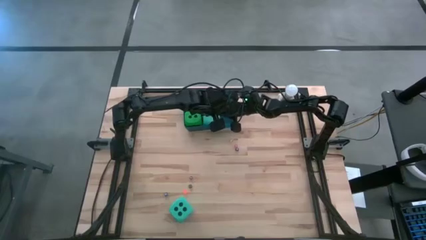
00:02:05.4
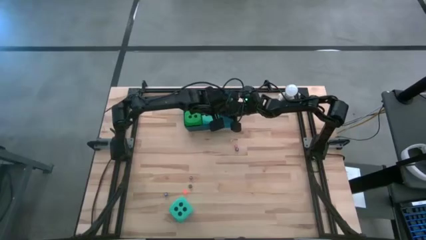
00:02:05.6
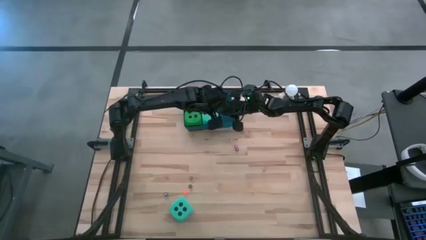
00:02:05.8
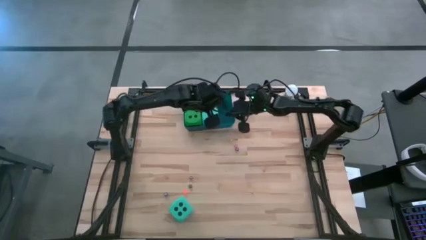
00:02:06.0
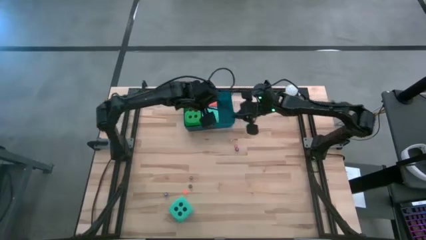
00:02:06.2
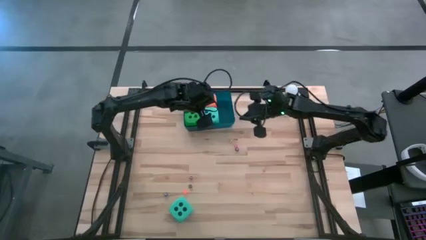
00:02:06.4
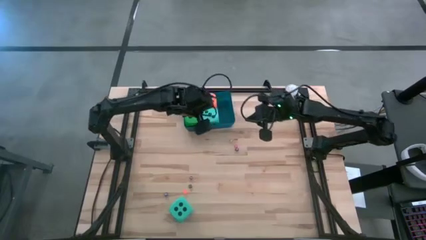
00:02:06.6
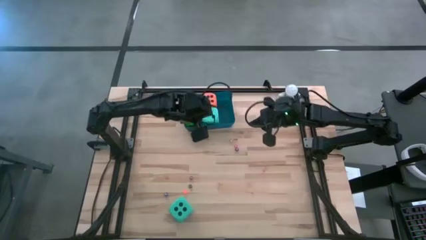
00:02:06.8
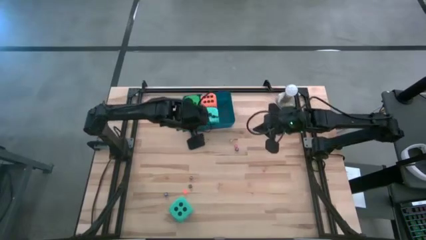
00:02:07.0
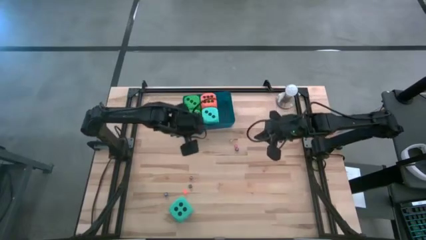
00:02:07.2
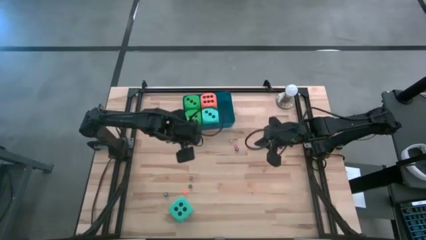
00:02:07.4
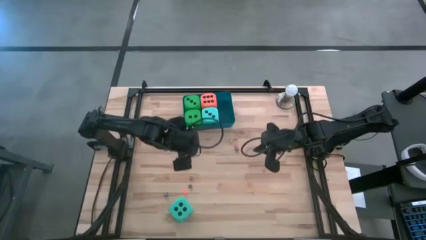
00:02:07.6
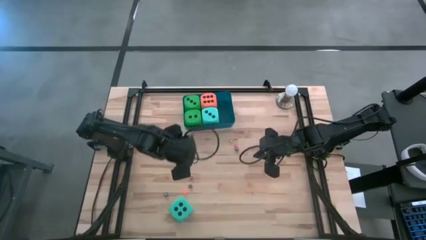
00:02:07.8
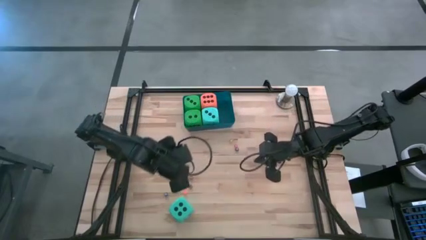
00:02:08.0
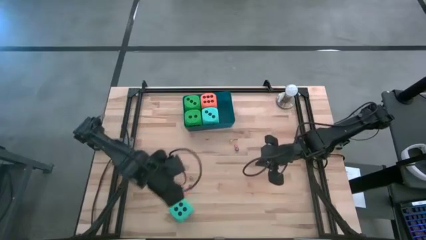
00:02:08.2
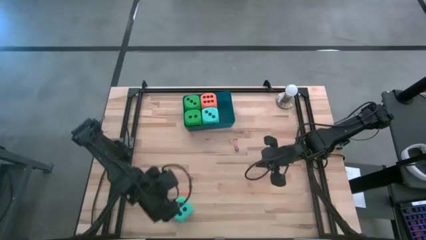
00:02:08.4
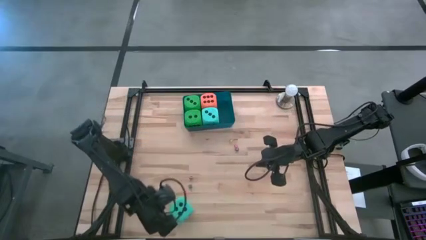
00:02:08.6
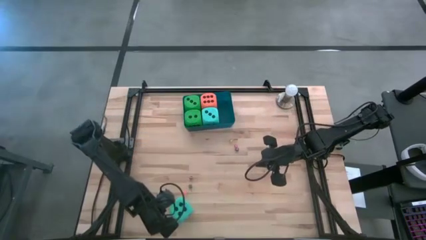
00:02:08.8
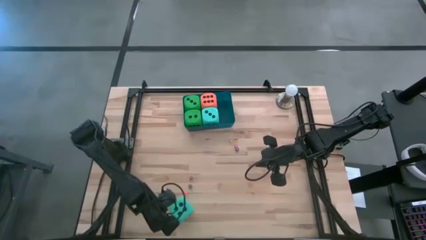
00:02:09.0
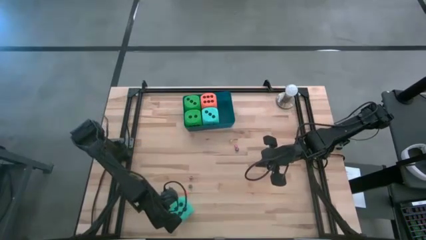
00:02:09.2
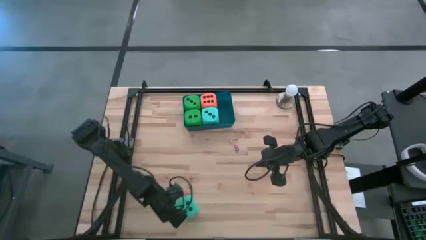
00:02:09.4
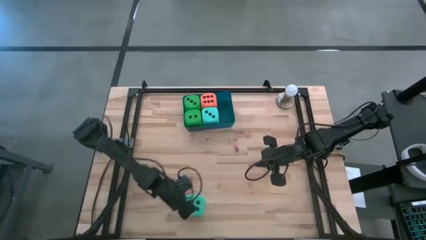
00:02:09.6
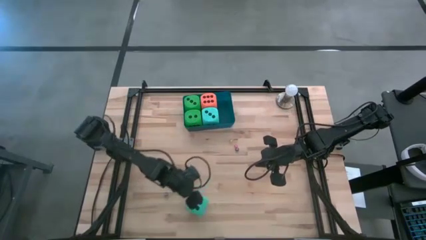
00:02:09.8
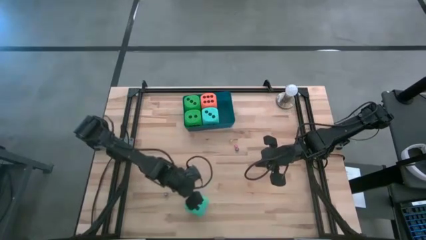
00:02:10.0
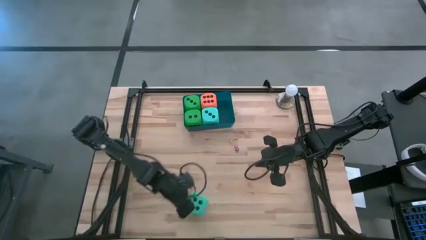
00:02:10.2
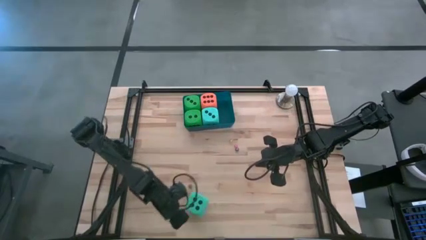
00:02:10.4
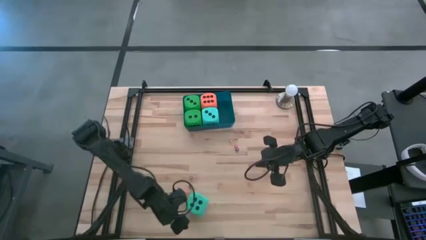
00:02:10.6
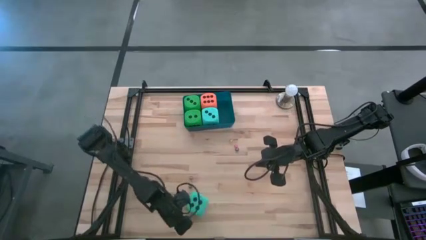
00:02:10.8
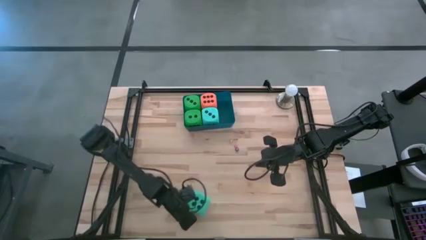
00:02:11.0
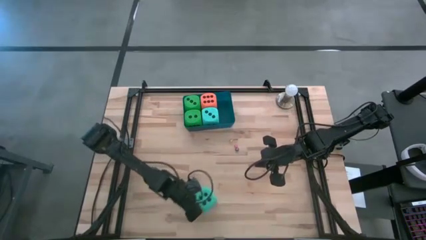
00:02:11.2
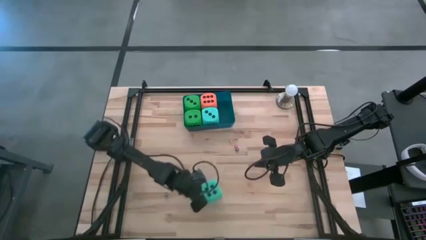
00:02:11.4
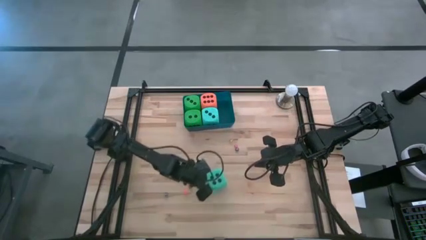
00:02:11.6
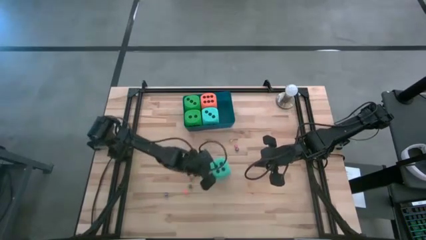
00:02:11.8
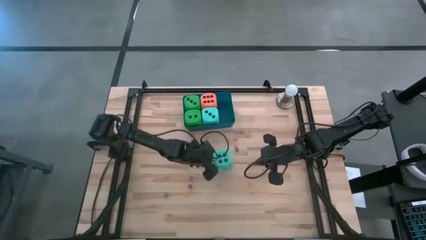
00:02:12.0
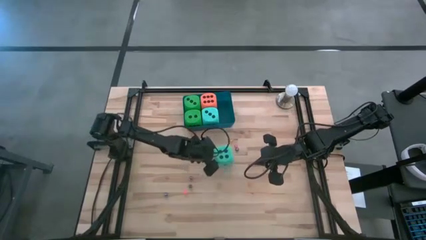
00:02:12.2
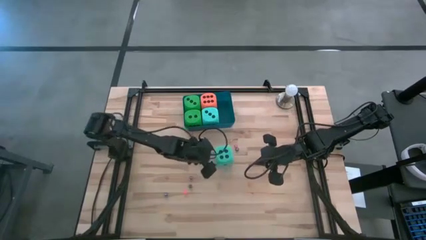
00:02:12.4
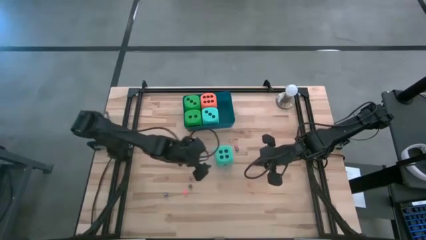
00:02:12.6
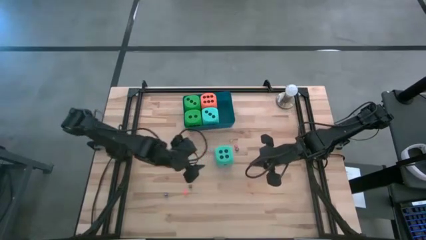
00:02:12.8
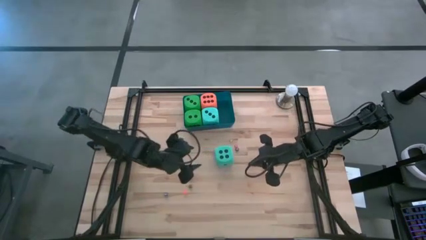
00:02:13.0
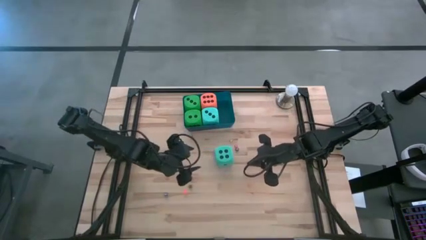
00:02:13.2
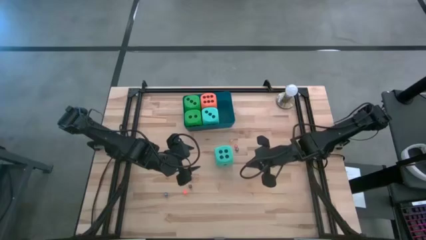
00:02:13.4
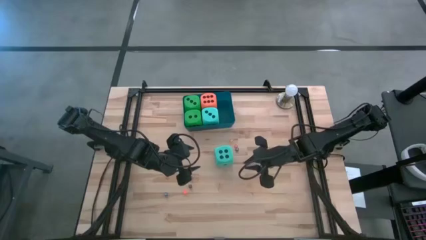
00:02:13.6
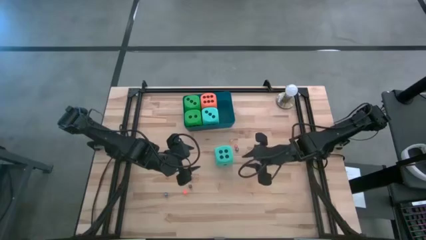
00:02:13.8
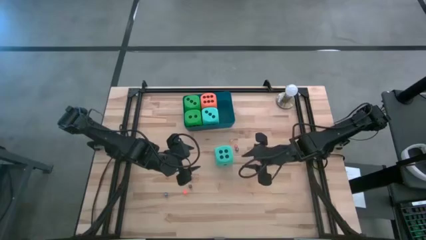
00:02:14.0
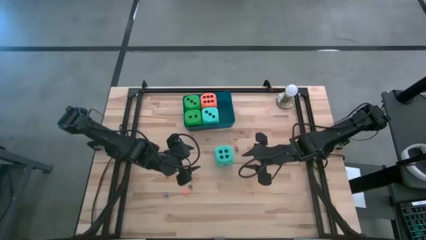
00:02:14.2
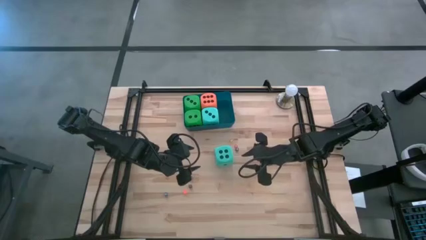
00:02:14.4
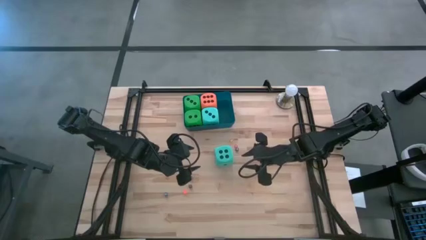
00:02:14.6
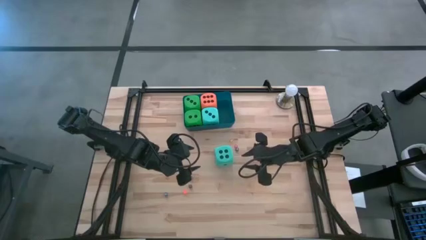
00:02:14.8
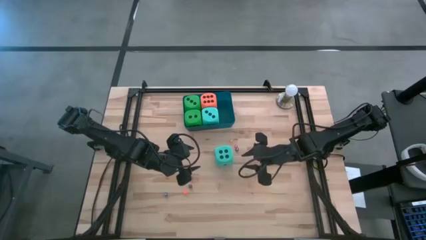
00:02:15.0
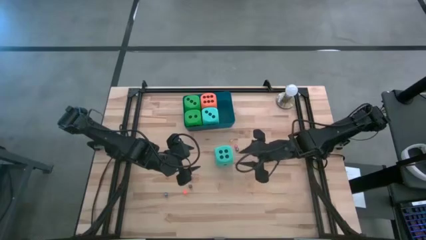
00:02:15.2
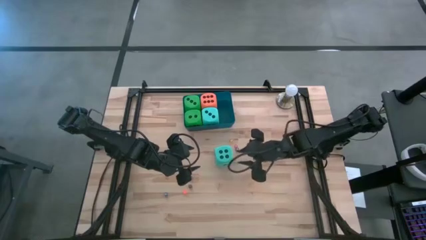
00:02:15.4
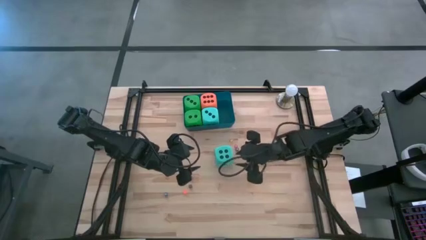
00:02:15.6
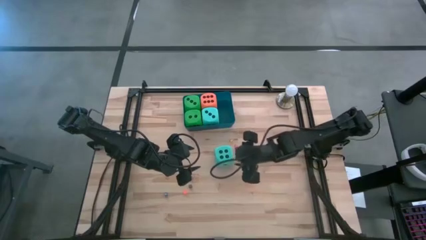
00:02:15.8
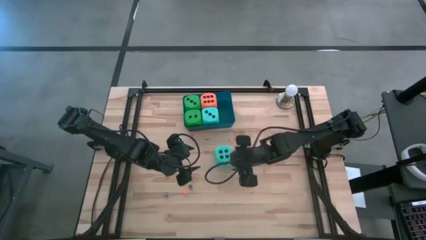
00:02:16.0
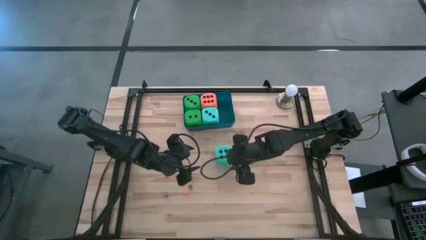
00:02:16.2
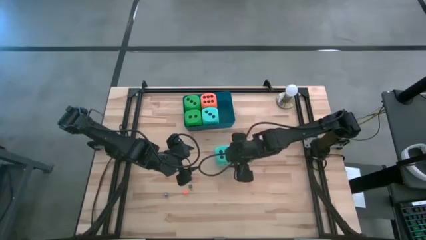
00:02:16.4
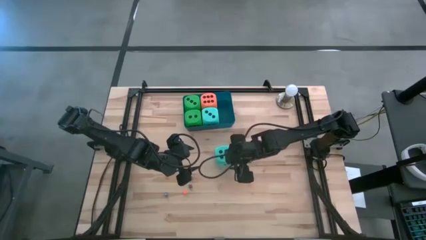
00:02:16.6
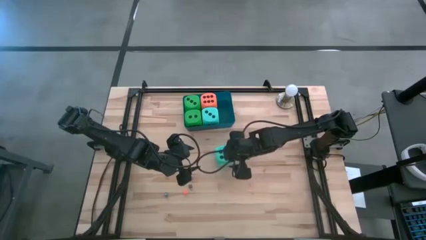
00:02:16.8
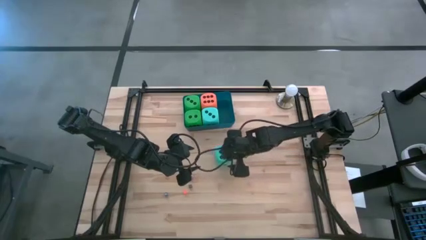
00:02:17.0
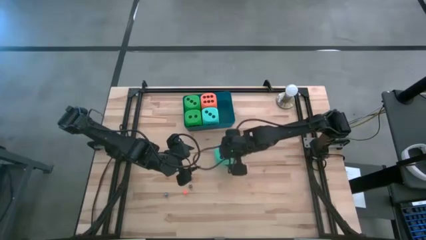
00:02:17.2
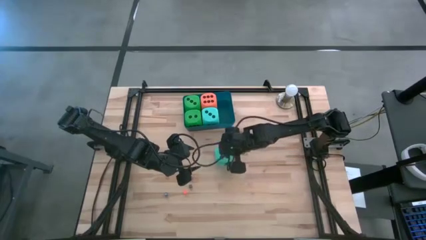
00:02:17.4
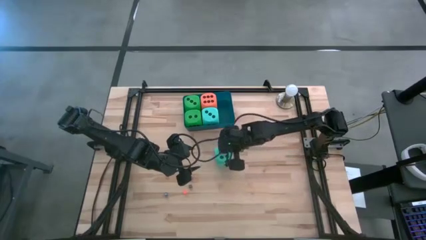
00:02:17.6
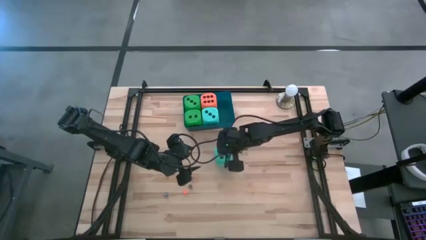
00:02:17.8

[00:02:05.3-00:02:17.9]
Task: Pick & Place Dice
Put the blue dice into the blue bin
